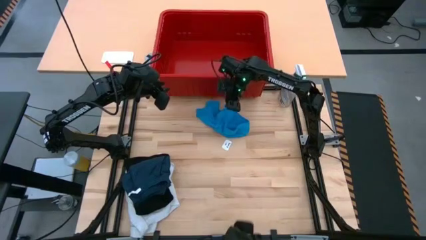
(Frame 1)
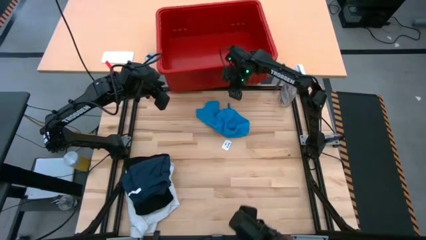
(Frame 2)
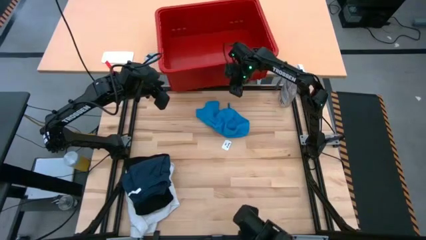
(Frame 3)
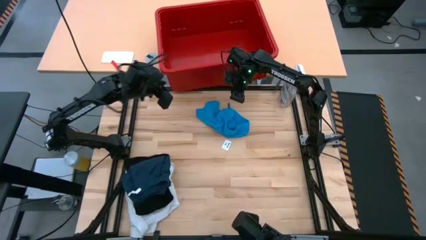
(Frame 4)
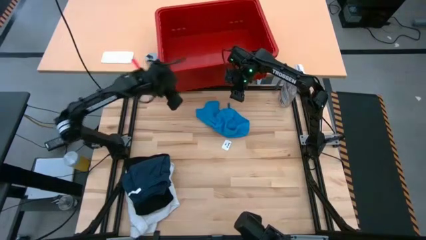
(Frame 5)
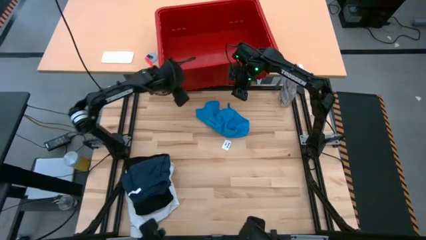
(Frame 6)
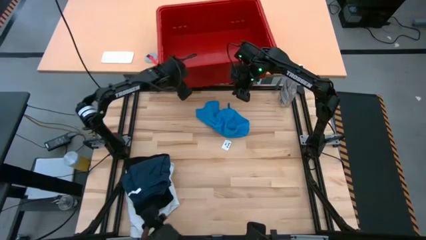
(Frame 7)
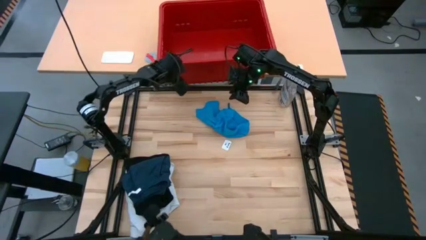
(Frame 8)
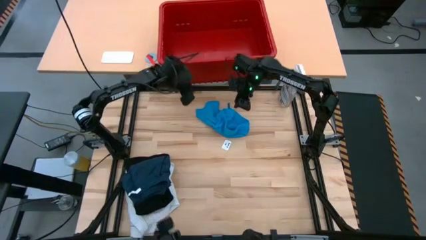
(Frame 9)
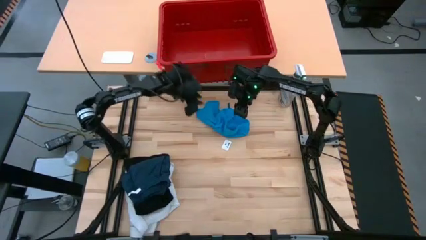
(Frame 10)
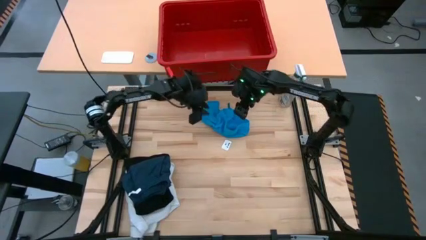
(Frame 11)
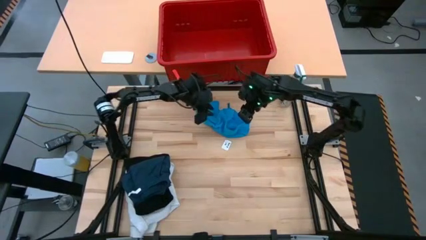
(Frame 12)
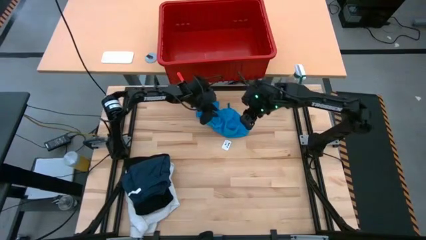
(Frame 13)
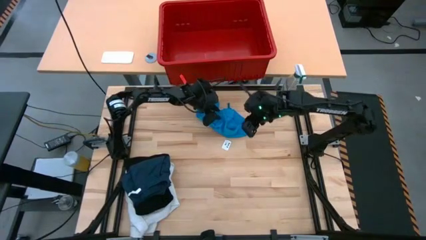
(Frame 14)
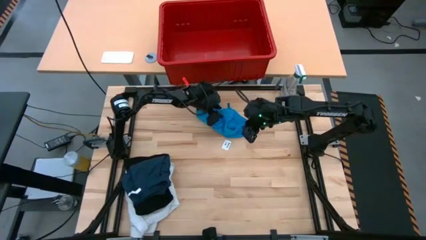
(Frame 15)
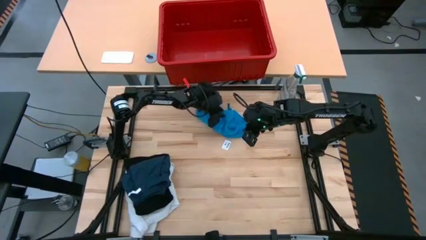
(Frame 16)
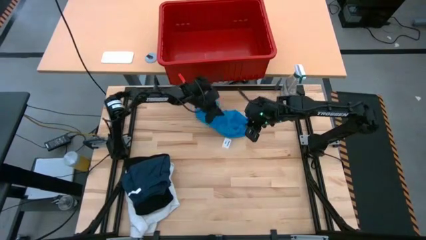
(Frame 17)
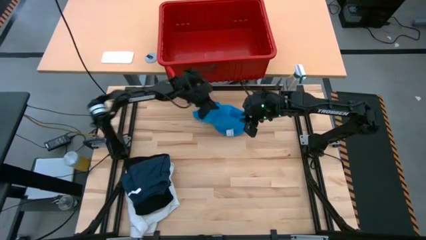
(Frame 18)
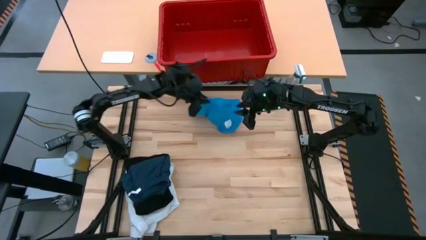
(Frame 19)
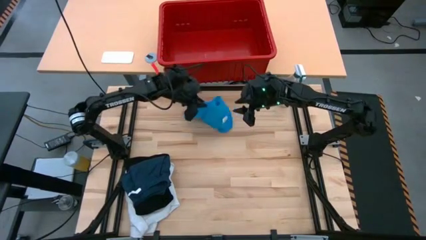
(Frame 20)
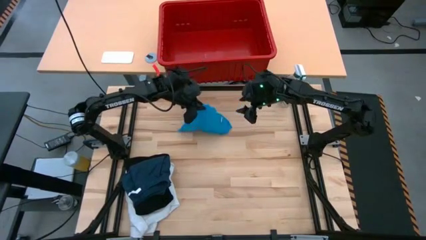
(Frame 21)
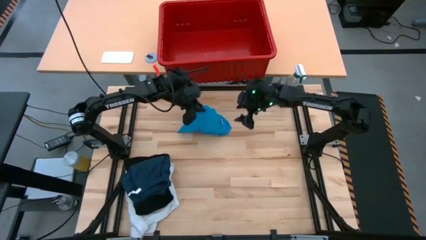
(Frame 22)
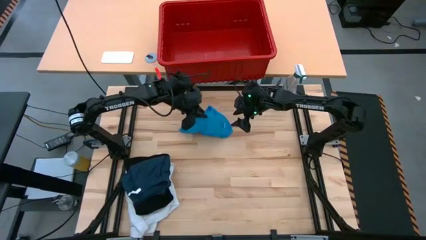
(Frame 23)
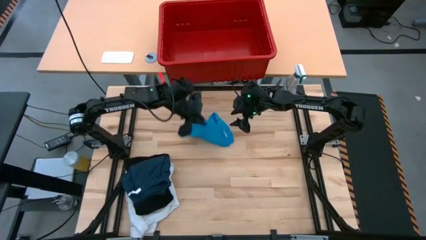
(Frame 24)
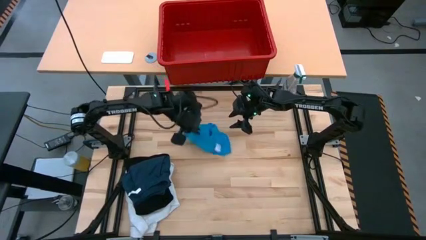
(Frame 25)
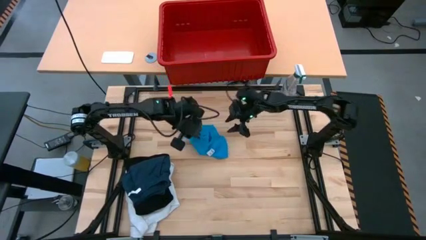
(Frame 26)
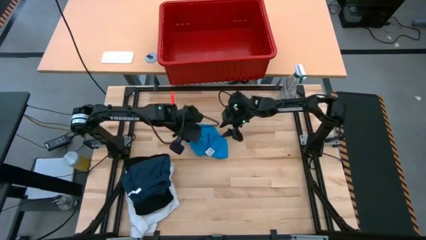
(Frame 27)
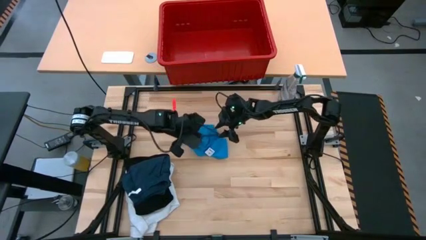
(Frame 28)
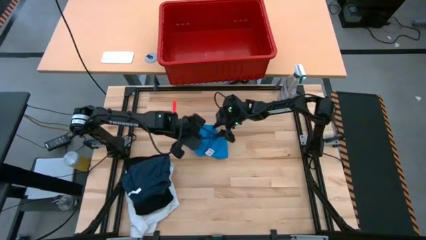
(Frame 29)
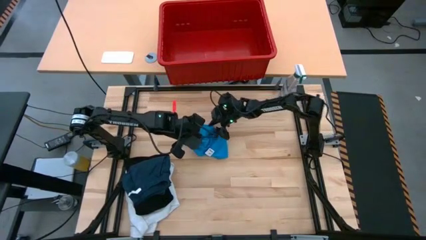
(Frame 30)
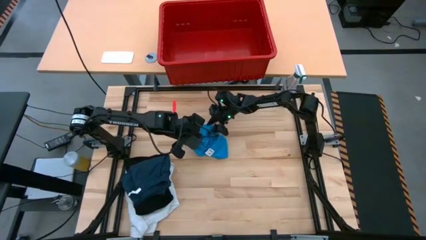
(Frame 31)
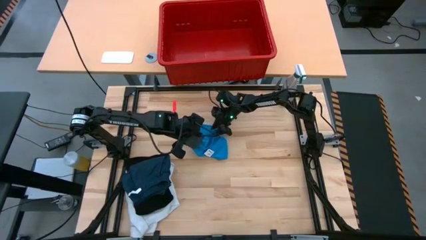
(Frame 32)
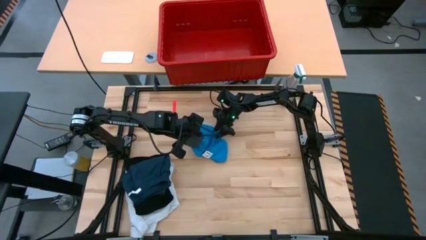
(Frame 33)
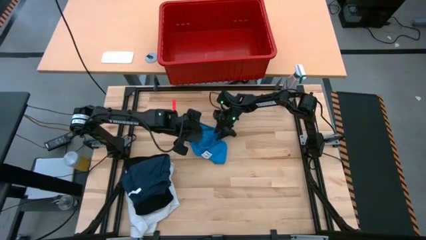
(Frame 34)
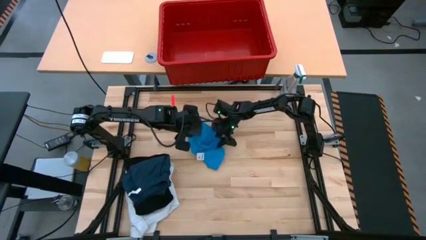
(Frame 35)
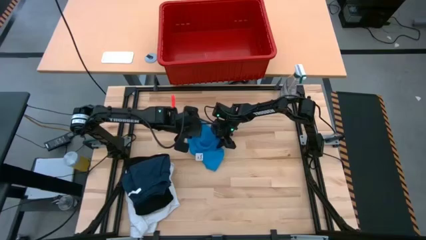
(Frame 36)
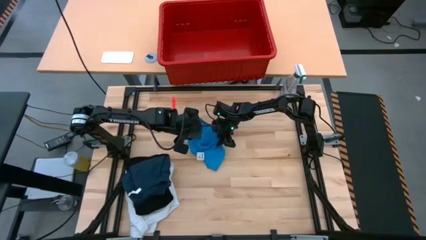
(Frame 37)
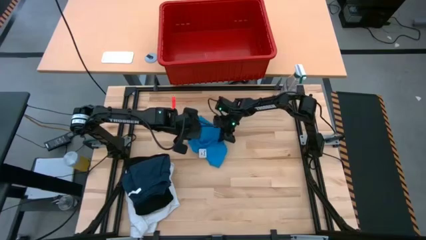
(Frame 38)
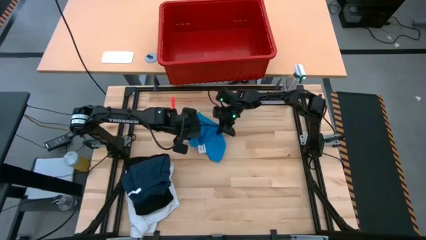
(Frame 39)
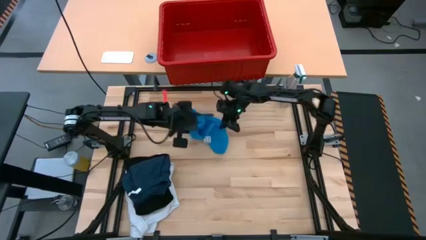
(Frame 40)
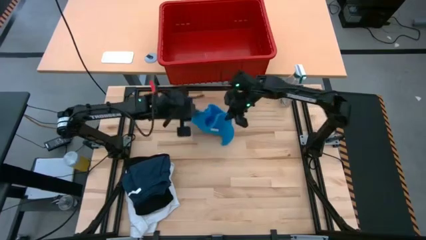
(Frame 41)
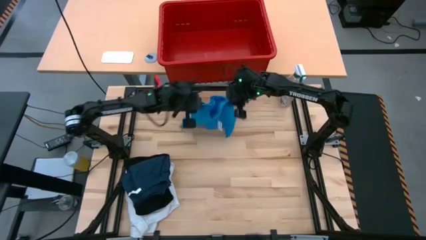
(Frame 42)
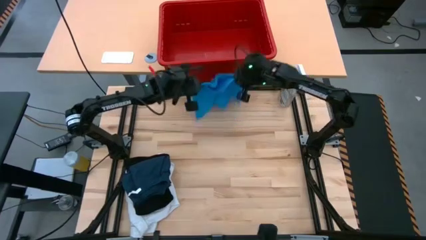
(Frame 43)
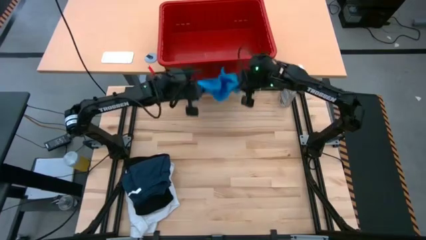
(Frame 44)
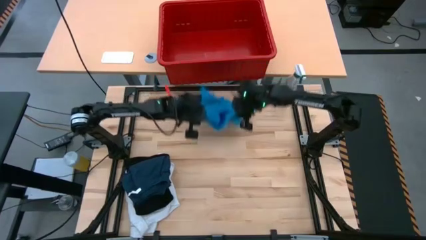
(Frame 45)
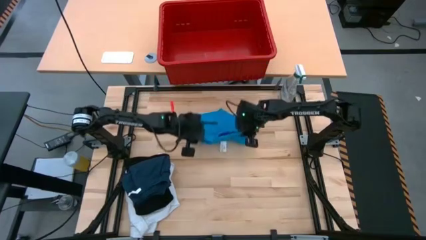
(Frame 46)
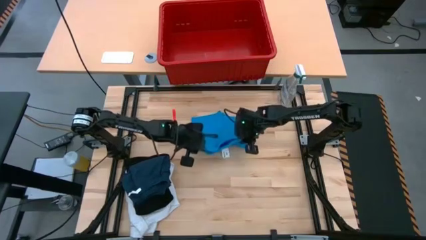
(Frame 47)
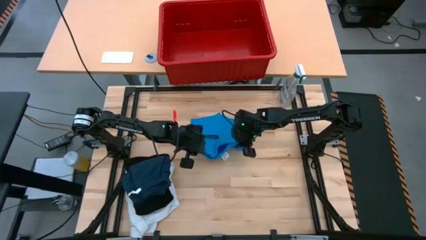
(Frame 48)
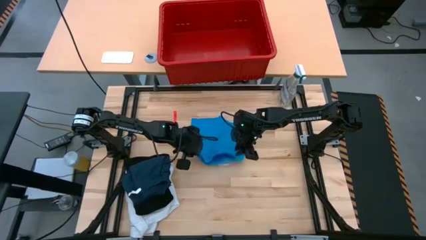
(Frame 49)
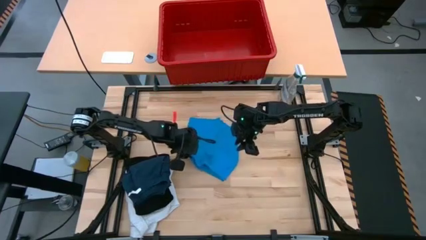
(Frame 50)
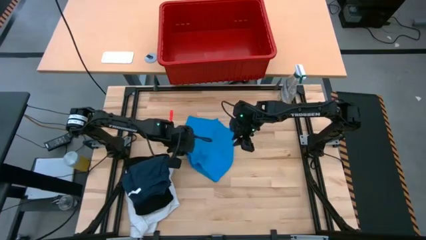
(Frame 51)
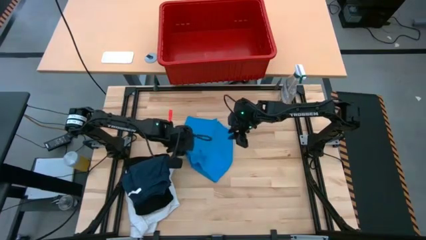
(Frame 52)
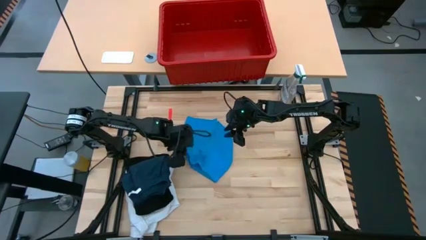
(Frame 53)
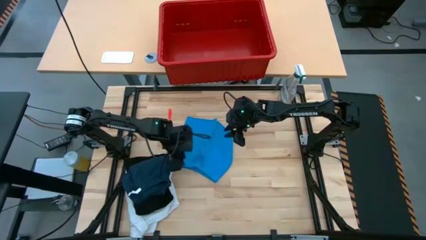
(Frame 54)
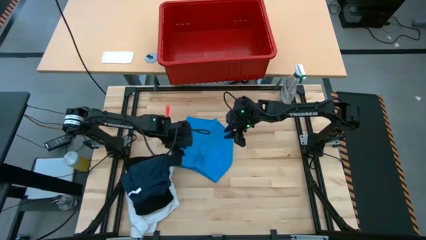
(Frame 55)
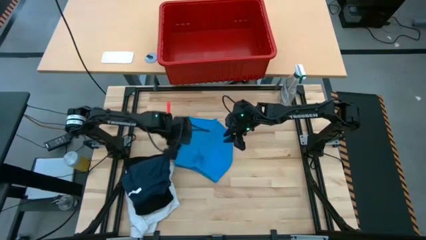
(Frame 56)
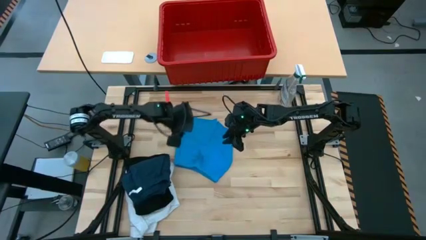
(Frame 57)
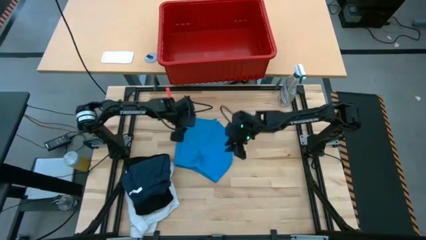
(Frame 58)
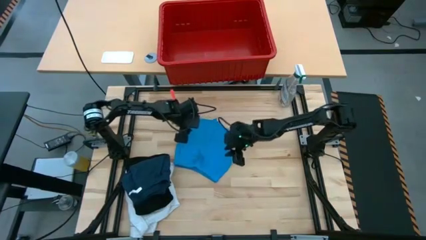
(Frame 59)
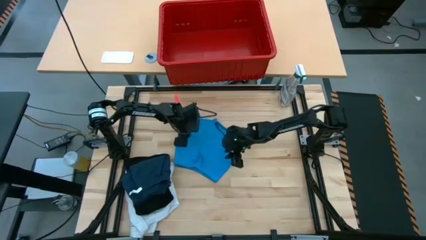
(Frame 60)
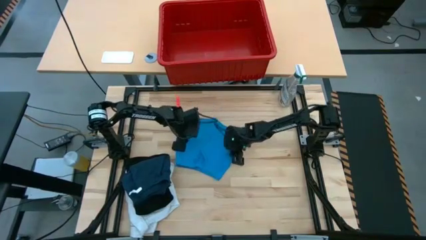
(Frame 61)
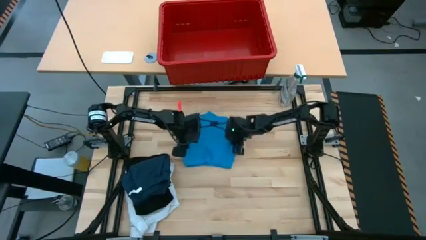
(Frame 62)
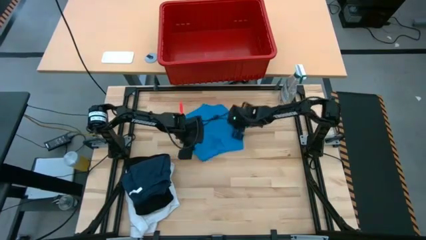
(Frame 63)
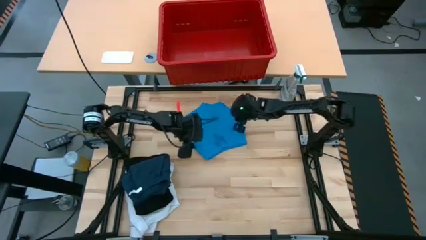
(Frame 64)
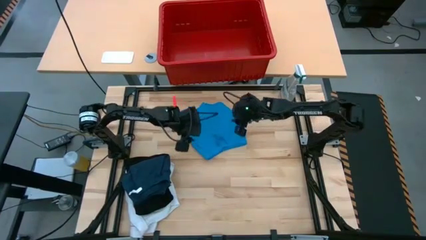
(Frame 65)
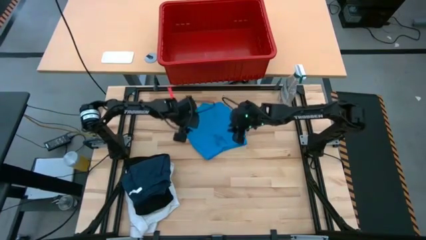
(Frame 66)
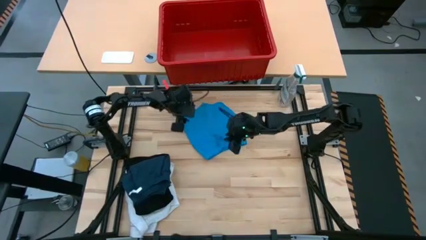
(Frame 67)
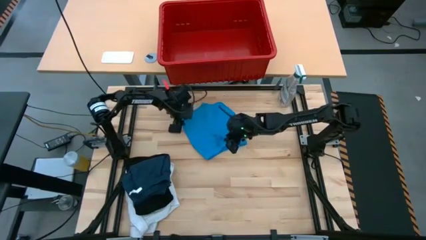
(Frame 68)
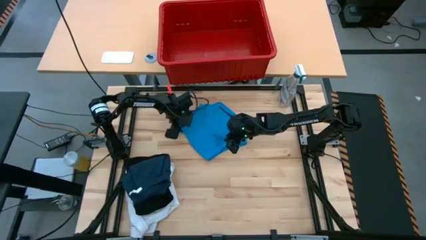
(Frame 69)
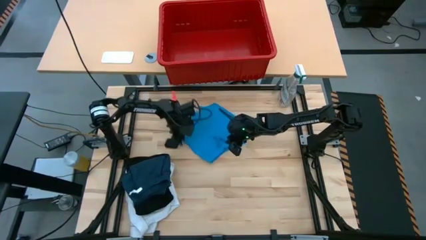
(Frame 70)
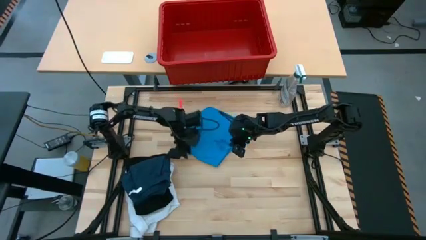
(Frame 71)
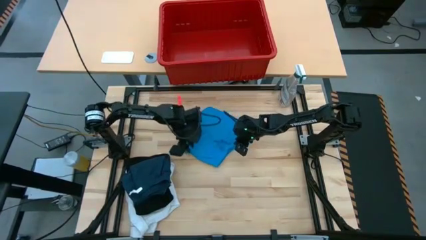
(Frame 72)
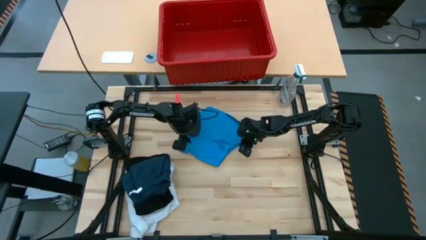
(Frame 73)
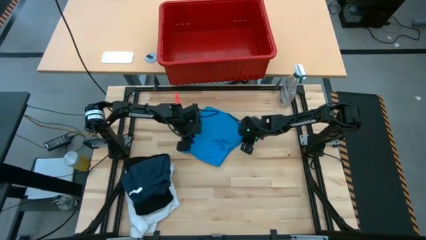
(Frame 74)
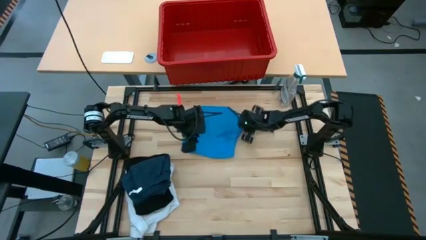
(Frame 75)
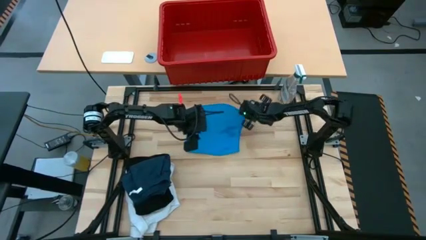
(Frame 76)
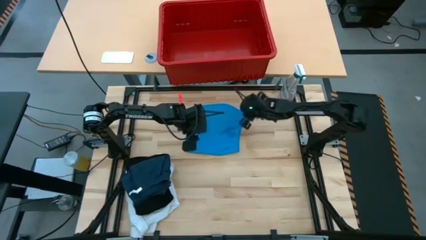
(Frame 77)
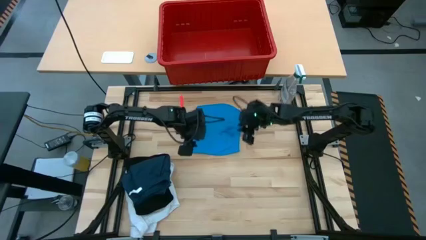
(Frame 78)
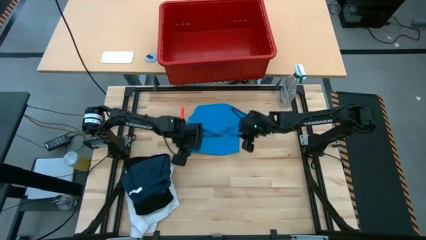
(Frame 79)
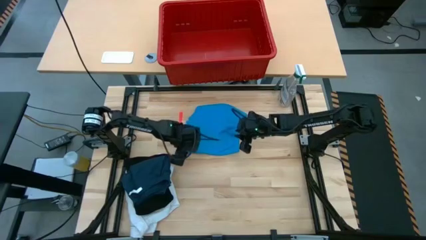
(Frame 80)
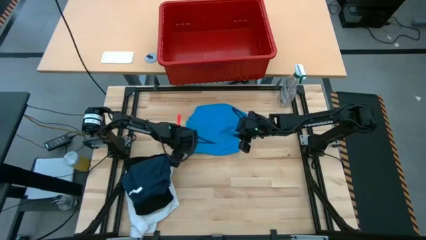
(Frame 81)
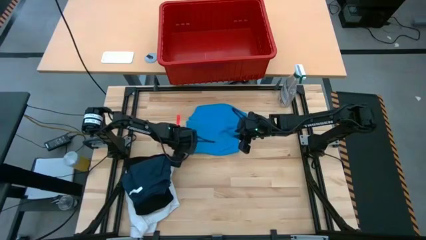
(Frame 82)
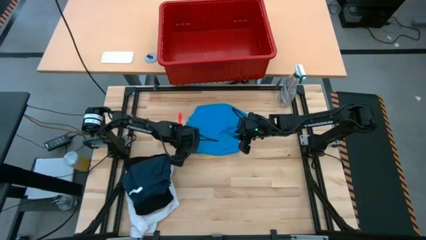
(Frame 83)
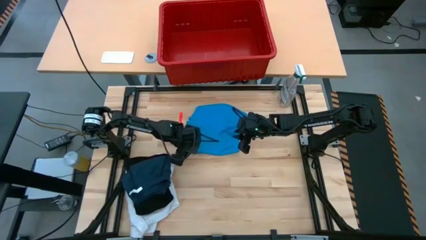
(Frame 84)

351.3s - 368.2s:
Task: Fold Laundry from Bin
Fold the blue shorts
